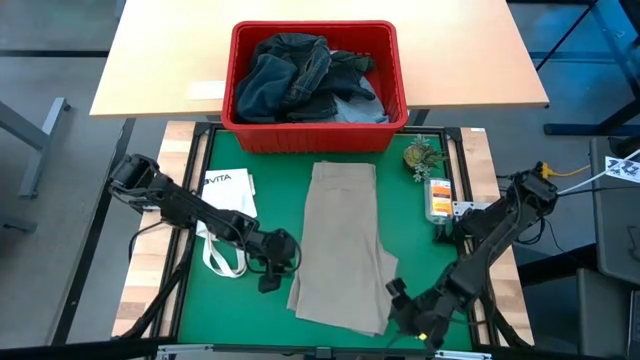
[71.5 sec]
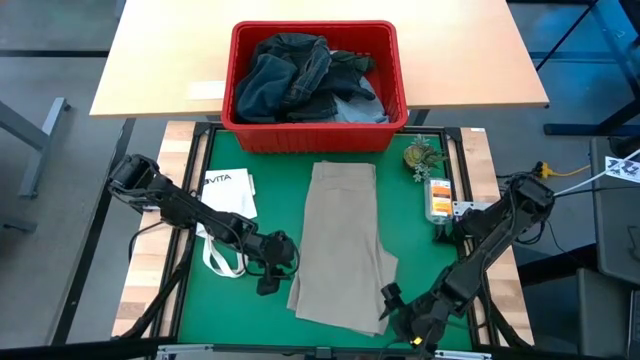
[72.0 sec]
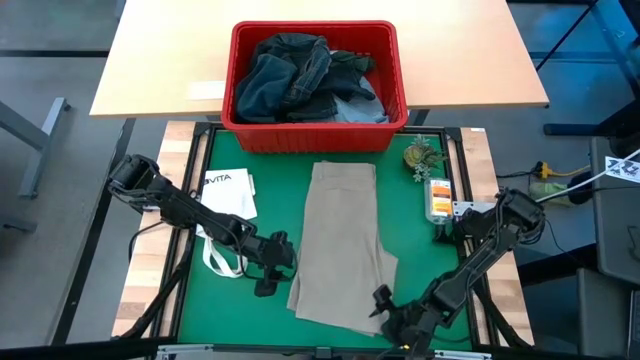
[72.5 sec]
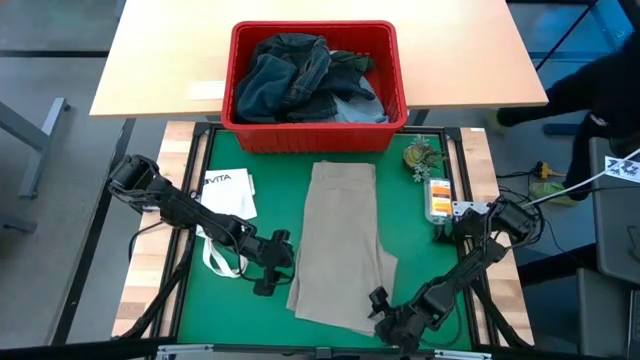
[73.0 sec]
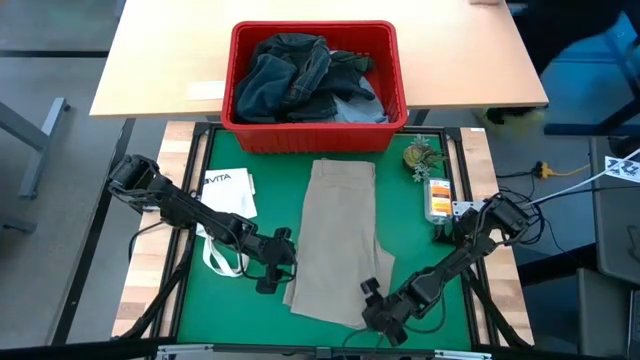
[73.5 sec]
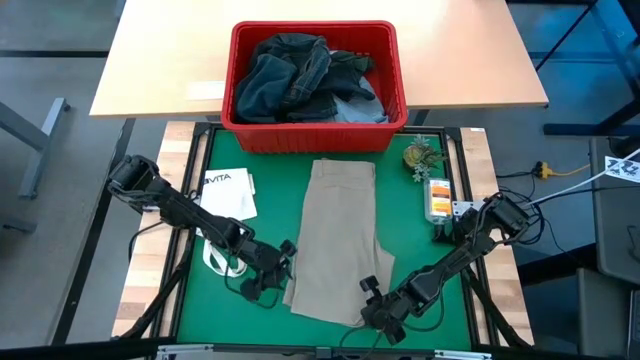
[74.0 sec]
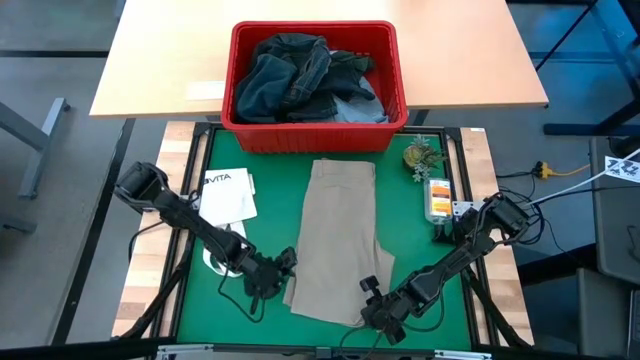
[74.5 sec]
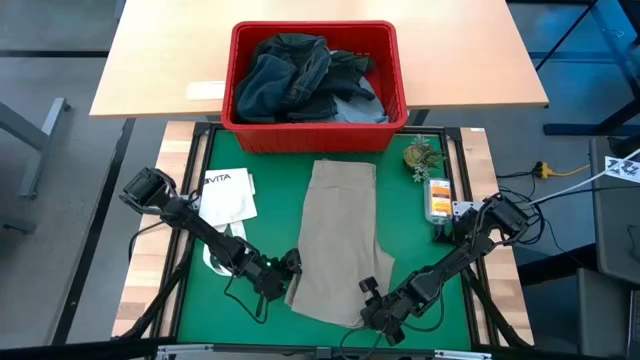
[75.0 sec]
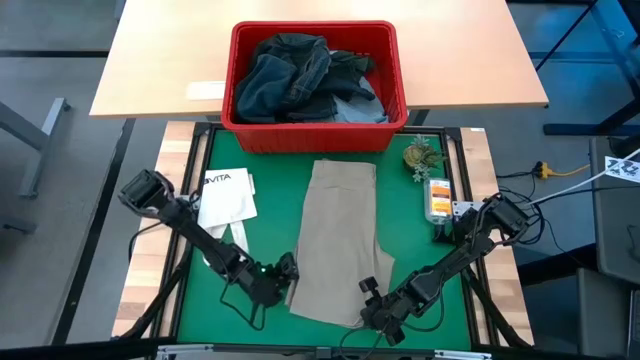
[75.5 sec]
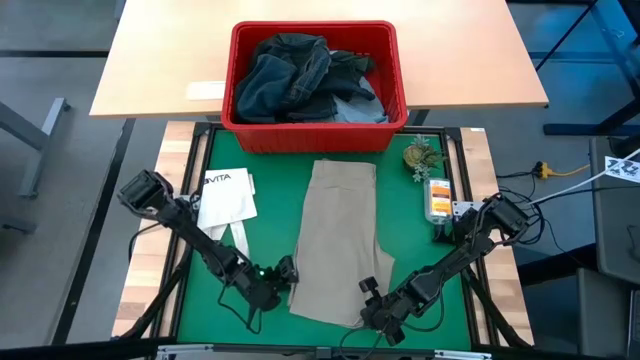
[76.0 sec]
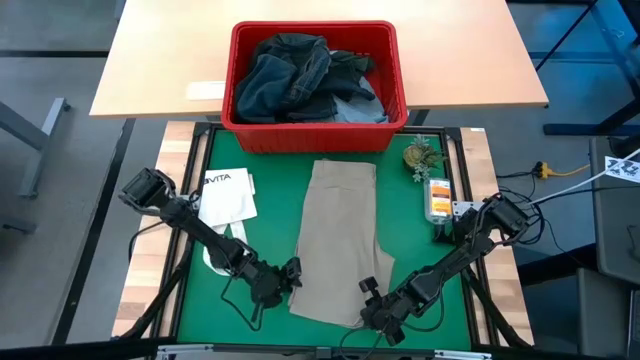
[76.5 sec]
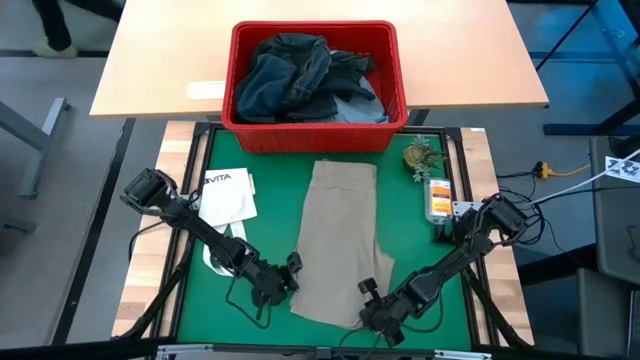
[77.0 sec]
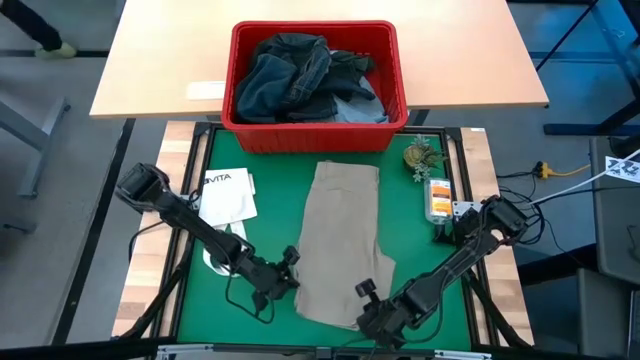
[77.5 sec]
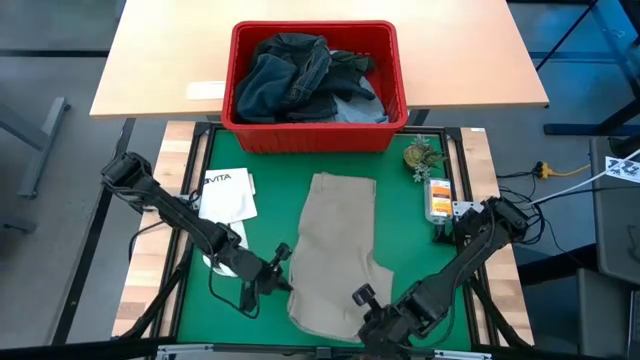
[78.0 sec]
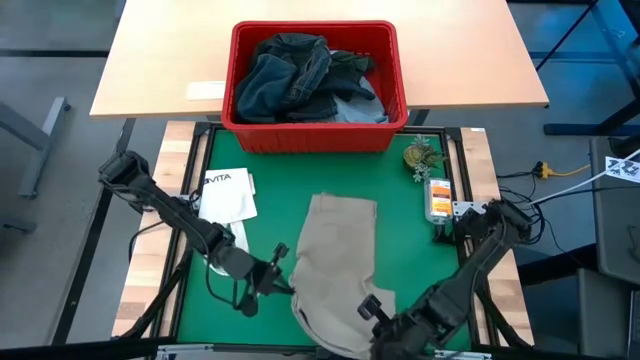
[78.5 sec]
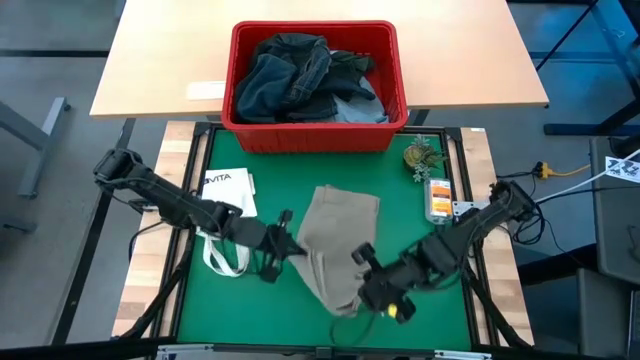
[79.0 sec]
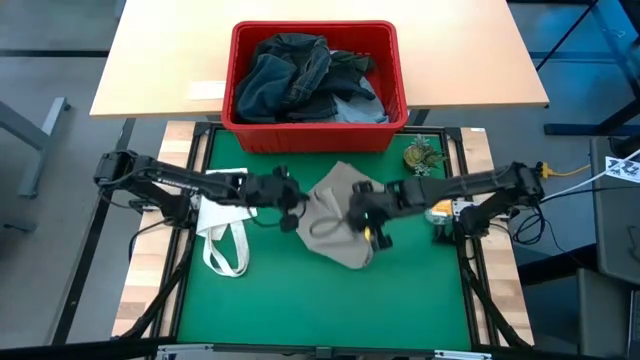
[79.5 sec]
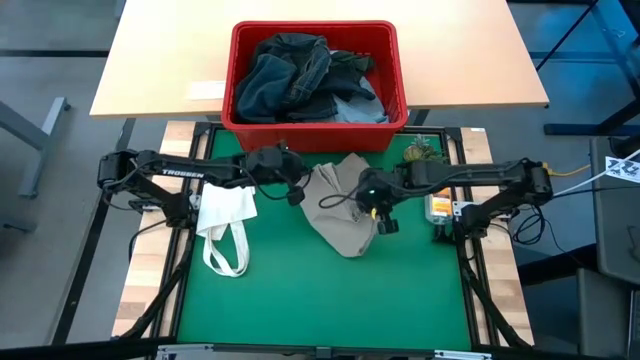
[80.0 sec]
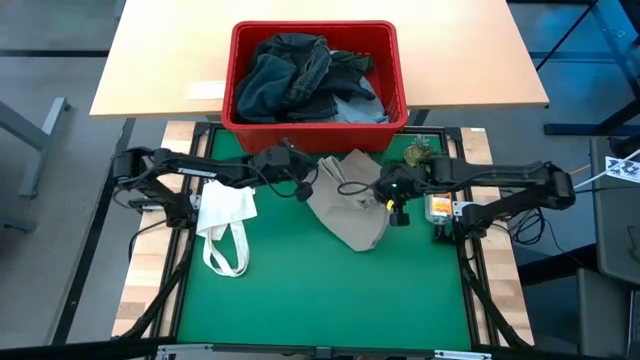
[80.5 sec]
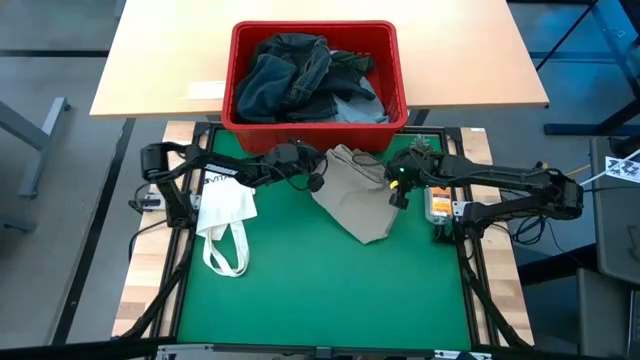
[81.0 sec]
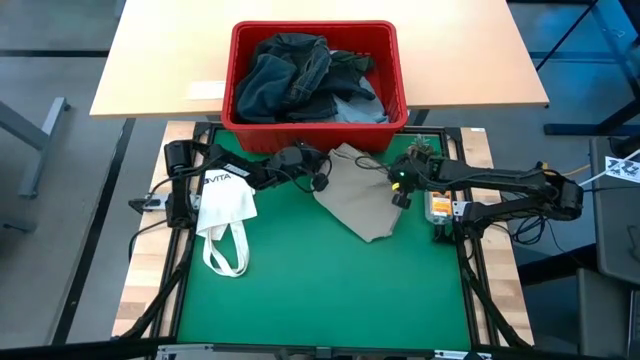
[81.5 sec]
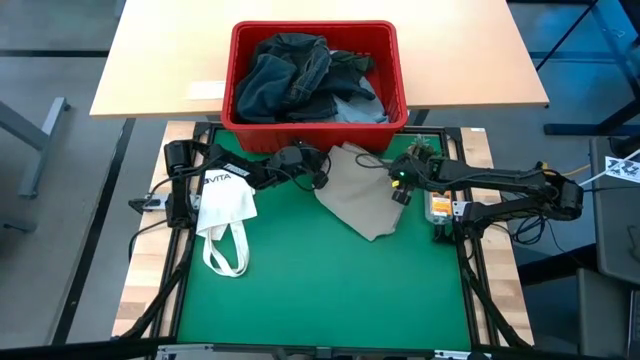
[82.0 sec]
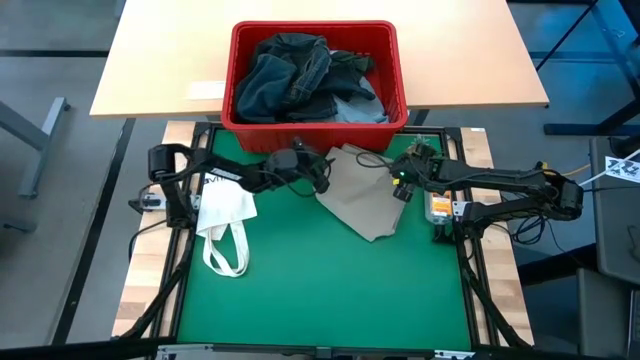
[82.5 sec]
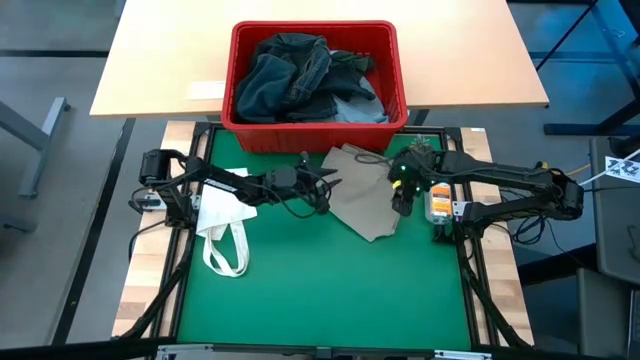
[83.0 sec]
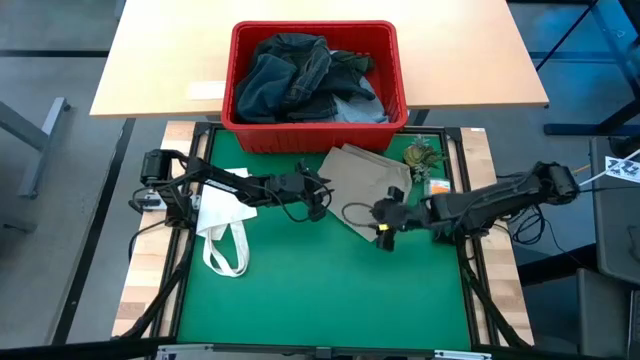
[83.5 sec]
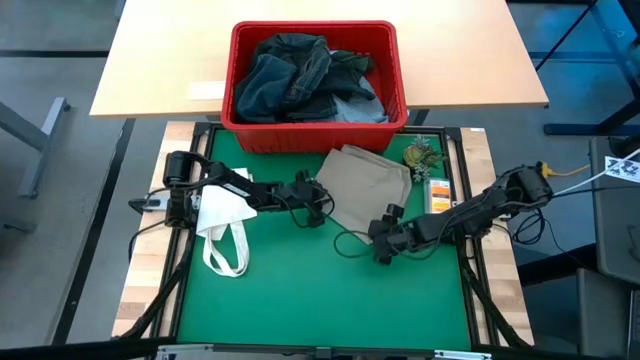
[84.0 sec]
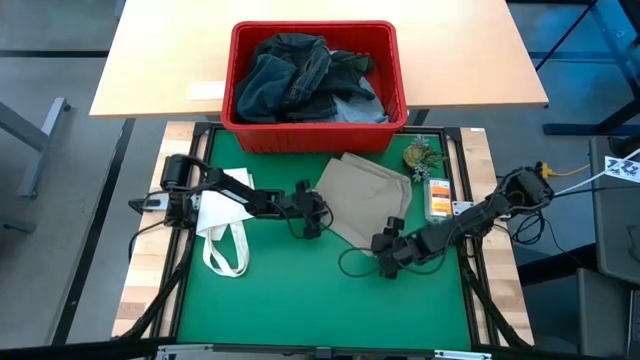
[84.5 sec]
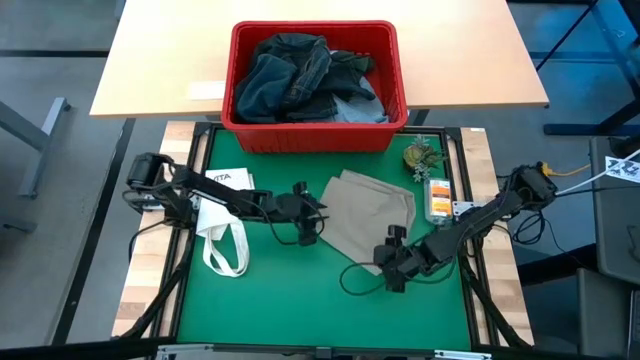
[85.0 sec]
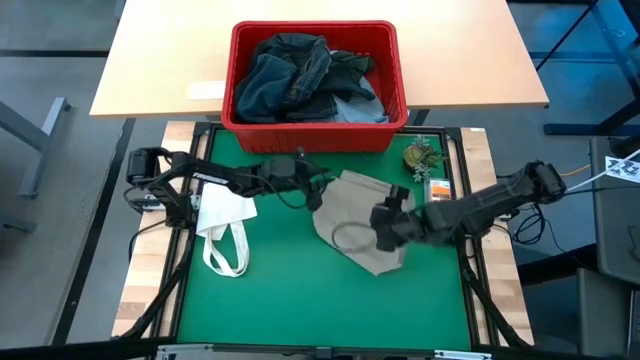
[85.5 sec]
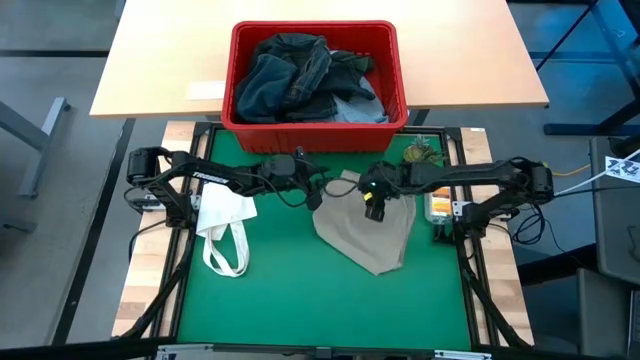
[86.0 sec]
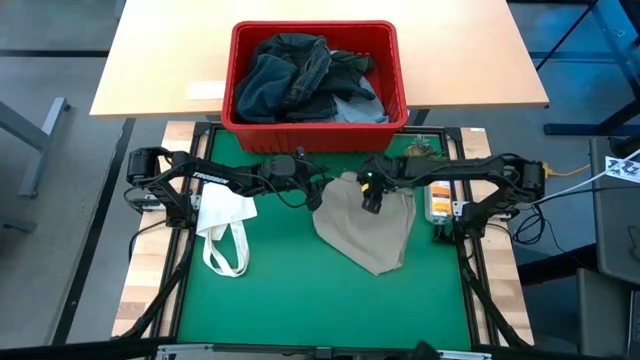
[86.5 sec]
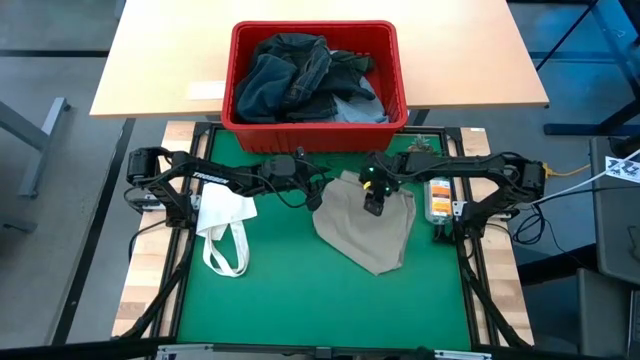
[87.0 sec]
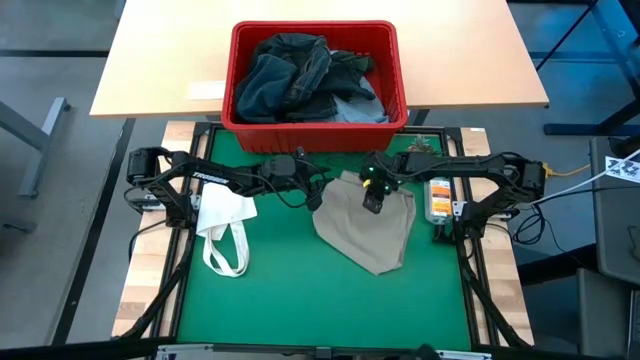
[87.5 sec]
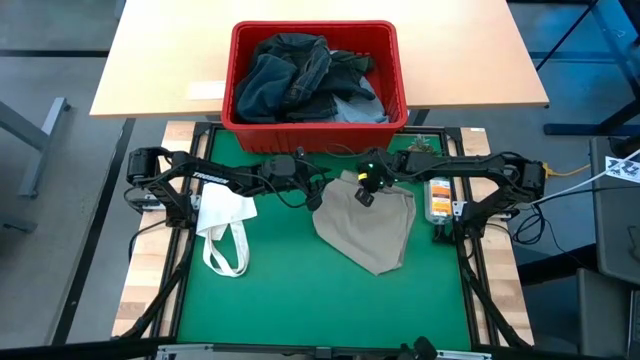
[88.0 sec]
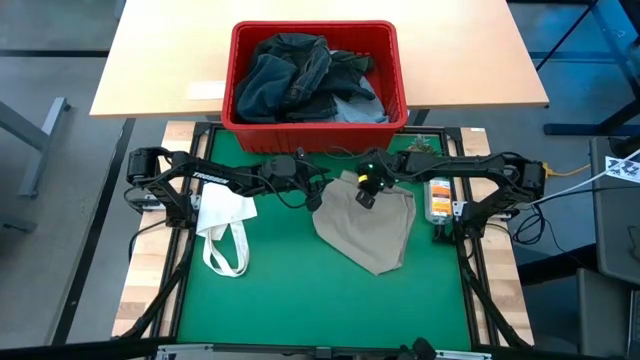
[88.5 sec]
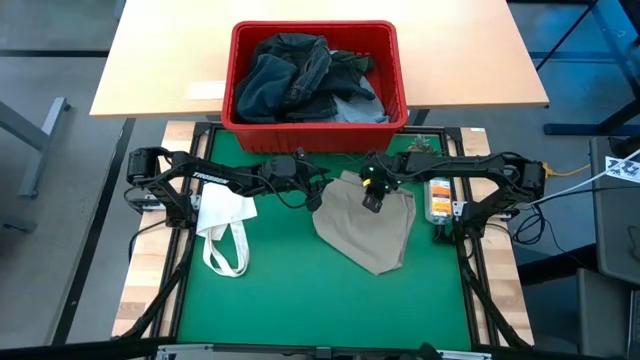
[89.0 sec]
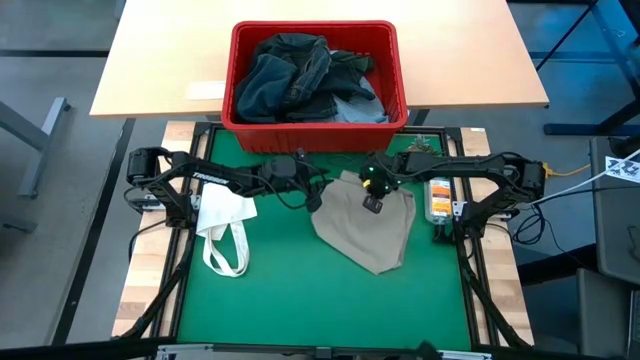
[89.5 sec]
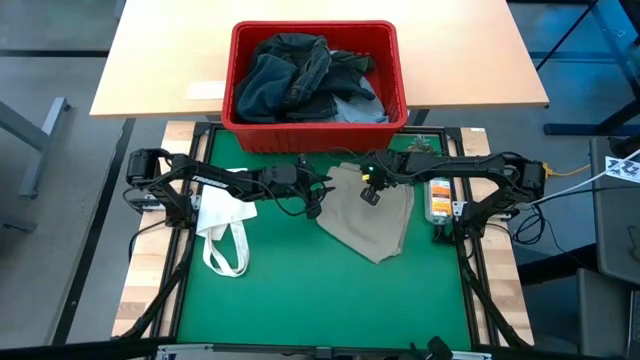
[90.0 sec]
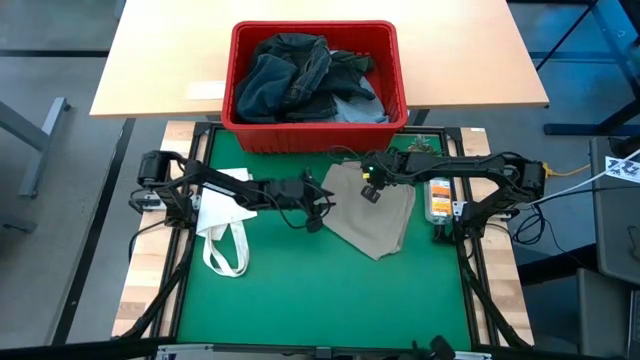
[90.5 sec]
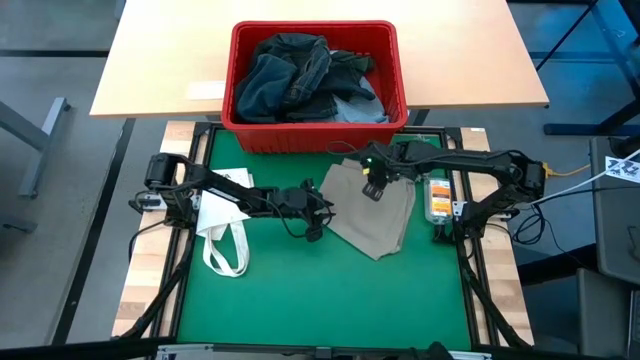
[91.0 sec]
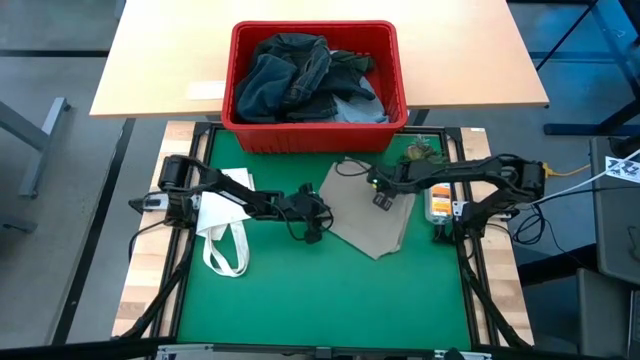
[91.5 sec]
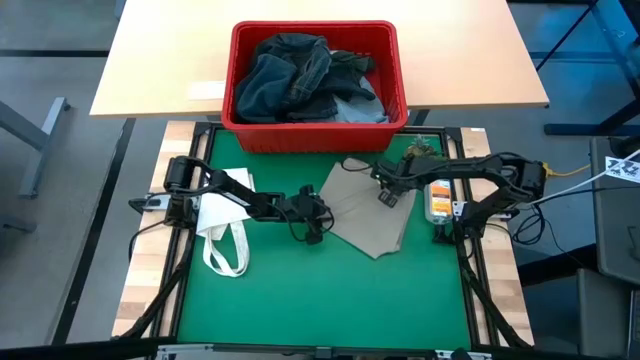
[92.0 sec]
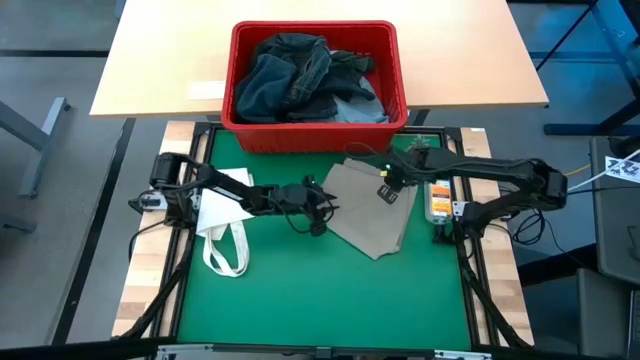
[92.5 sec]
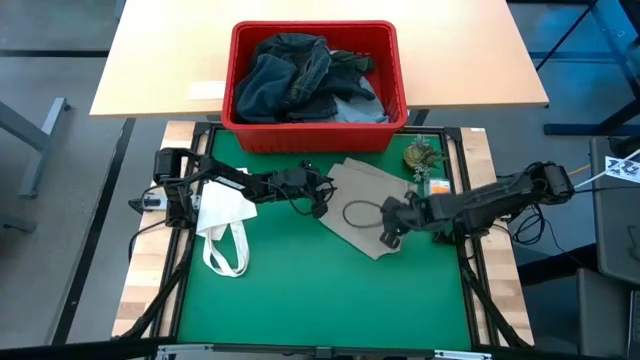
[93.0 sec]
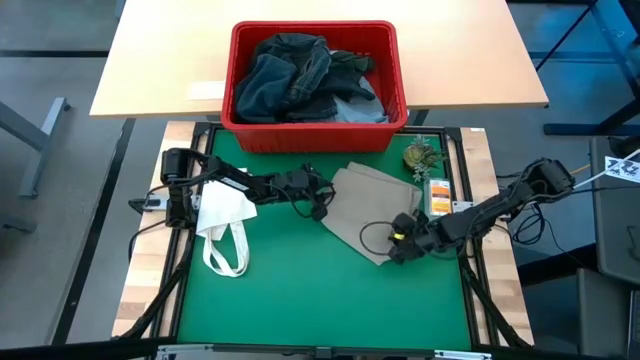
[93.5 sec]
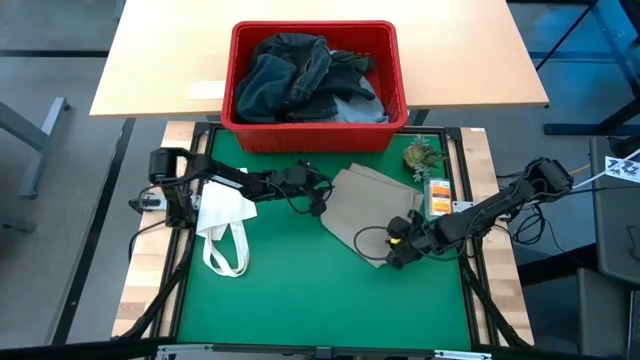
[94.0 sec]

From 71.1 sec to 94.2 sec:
Task: Fold Laundry from Bin
Fold the gray shorts
